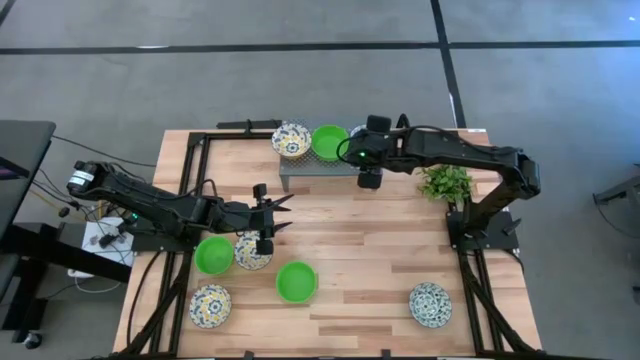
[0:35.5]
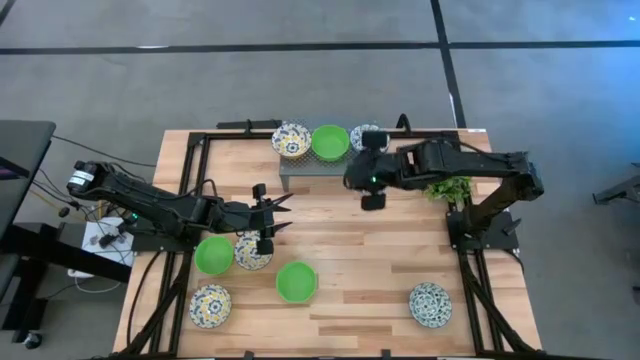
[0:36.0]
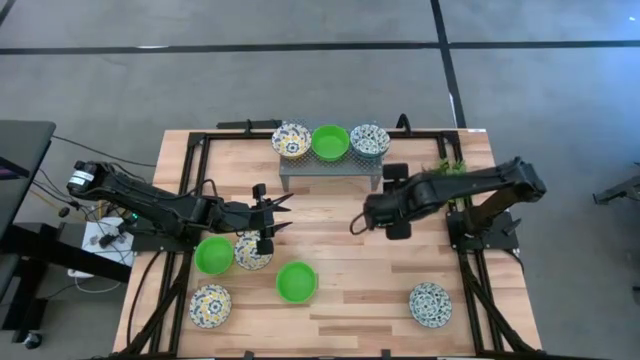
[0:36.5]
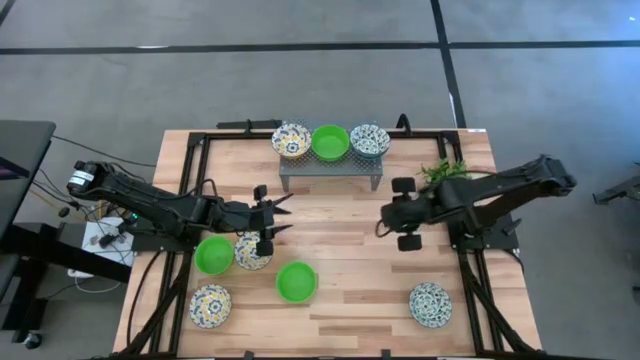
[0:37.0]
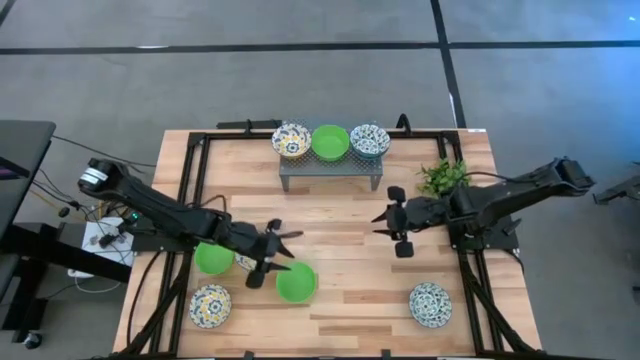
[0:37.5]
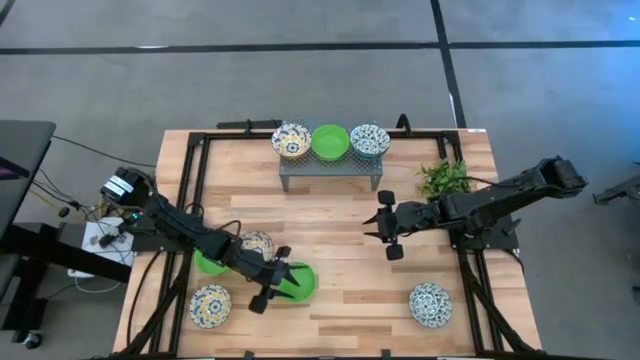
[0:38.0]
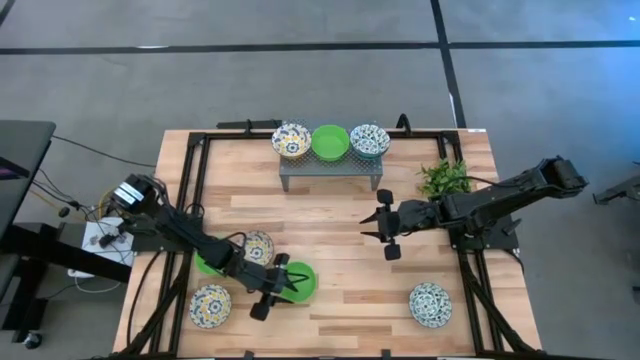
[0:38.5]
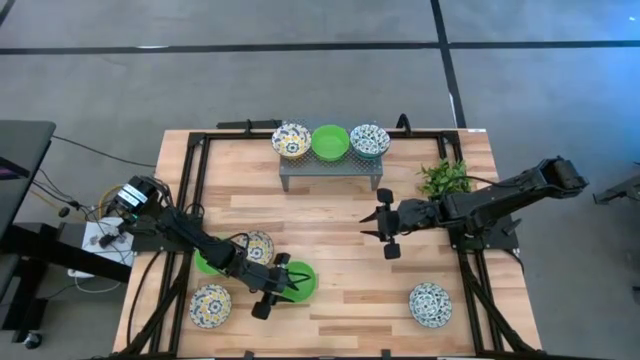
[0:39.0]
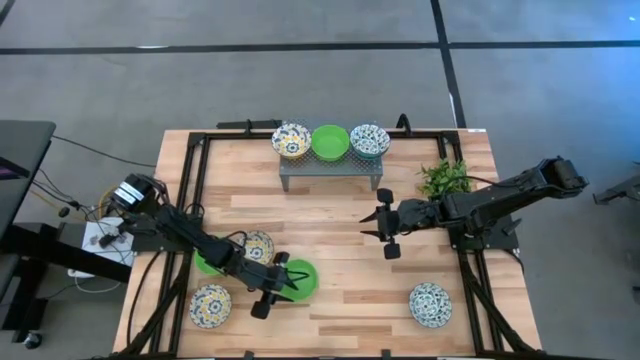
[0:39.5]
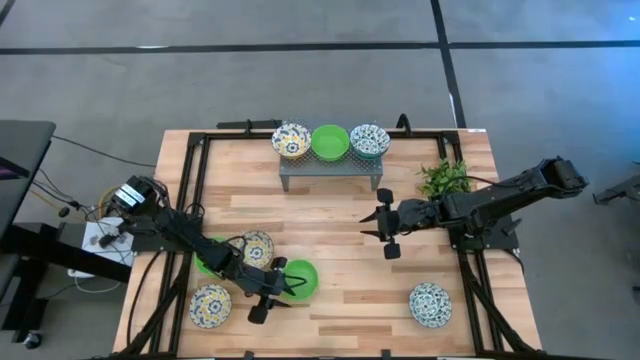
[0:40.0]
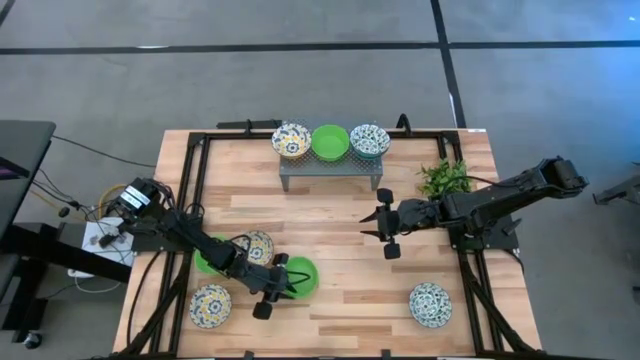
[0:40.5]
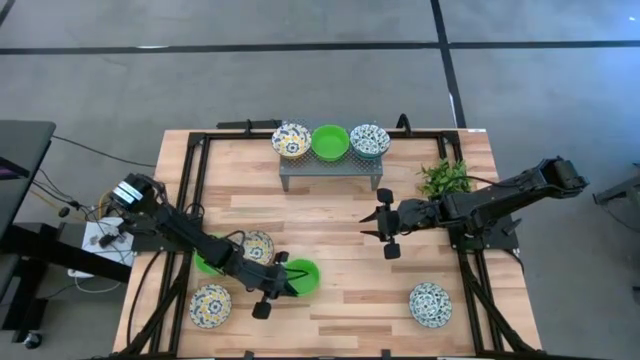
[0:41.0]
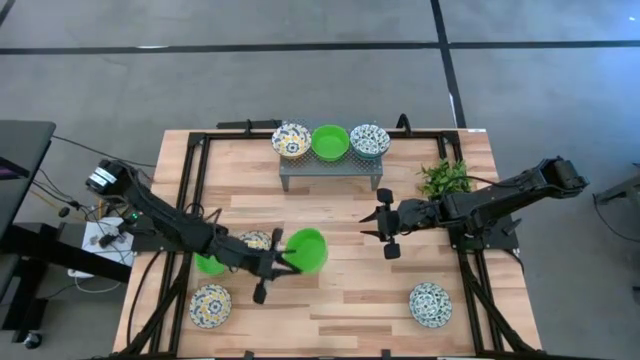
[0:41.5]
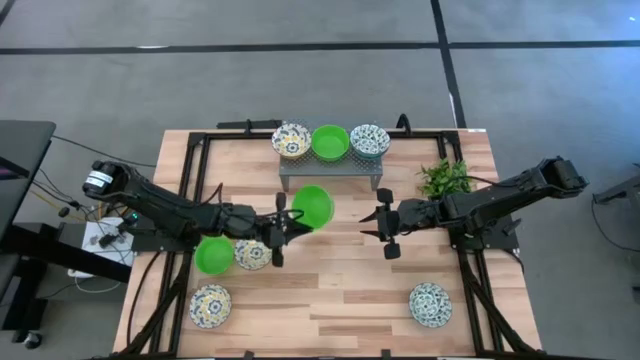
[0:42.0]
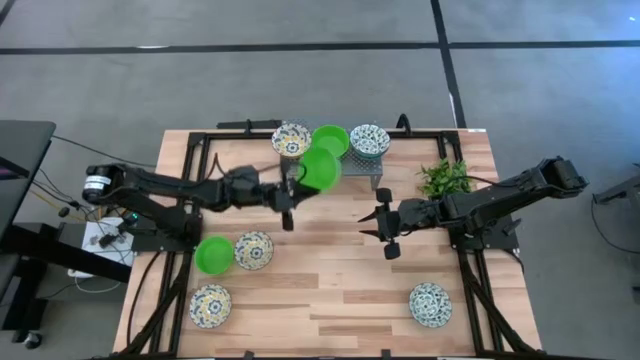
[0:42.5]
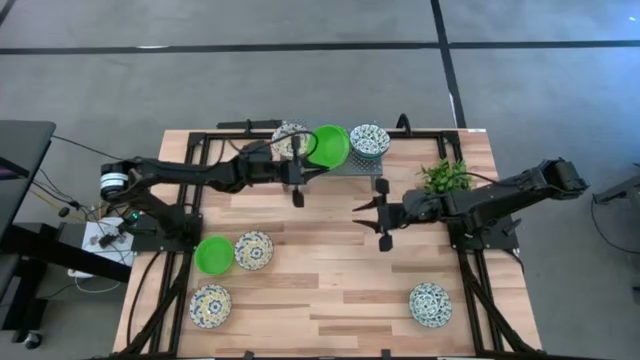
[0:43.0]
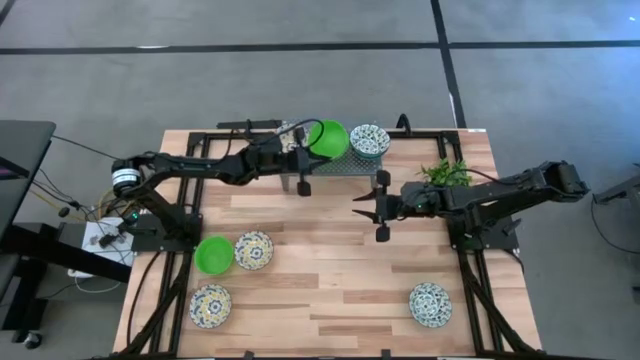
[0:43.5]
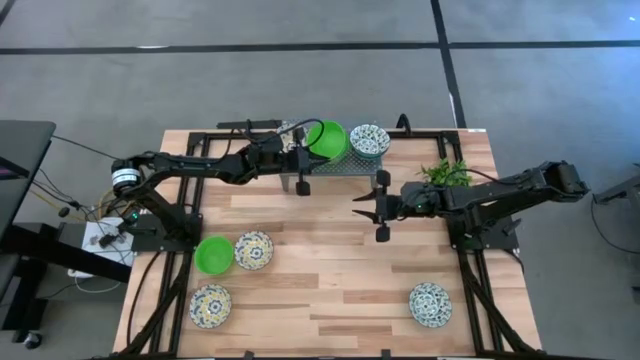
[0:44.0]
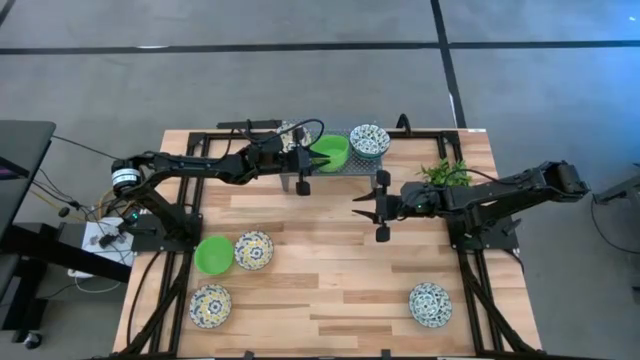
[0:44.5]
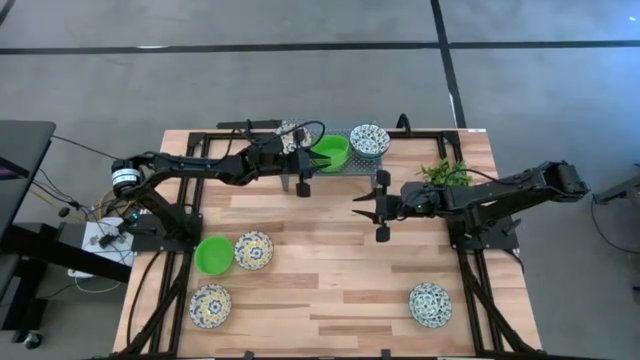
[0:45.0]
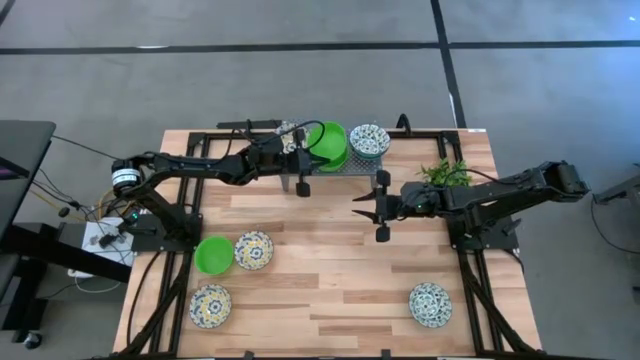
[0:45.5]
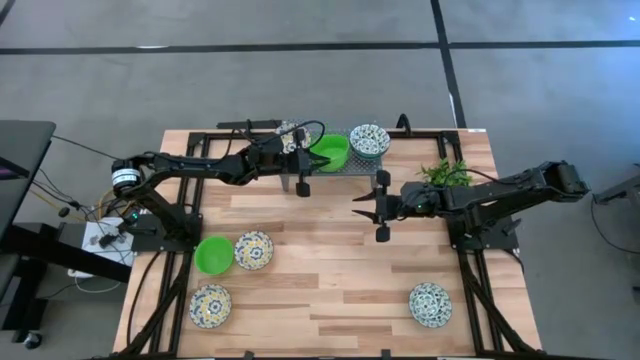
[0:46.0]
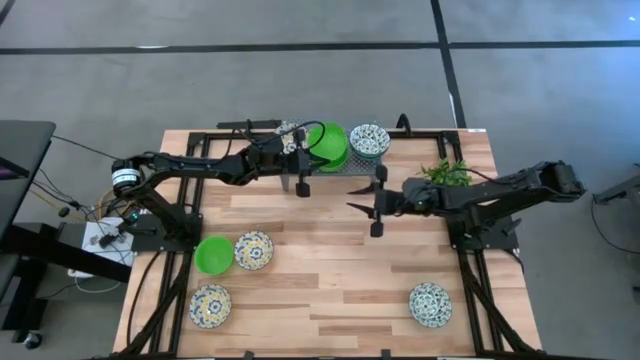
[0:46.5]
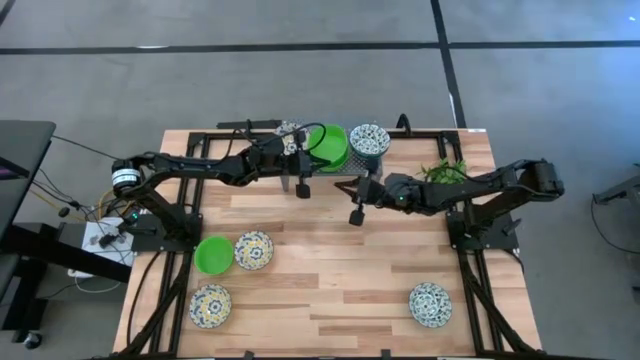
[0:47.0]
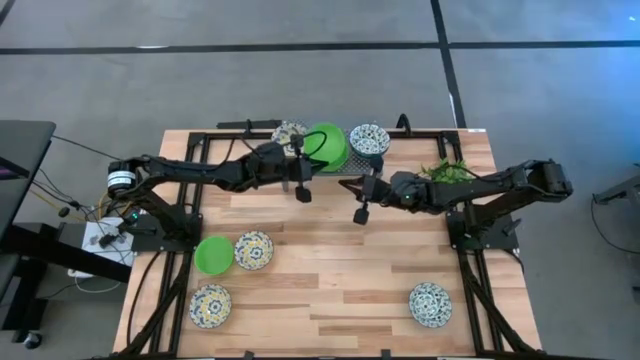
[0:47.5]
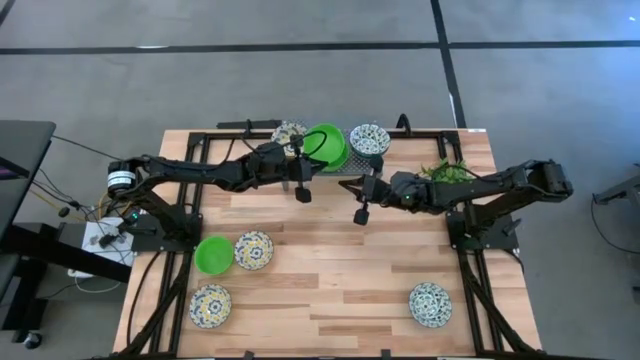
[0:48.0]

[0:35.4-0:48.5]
Task: Pick & Place Mini bowls
Stack the bottom green bowl on top of the green bowl on the shelf

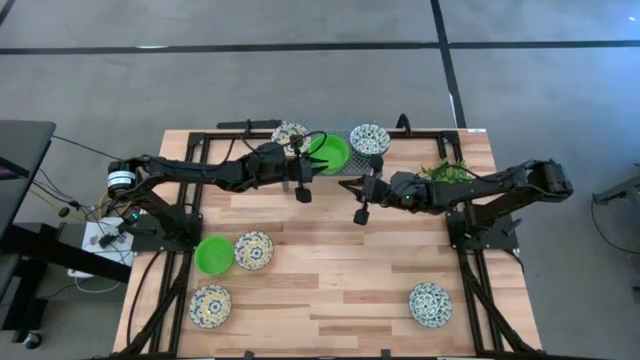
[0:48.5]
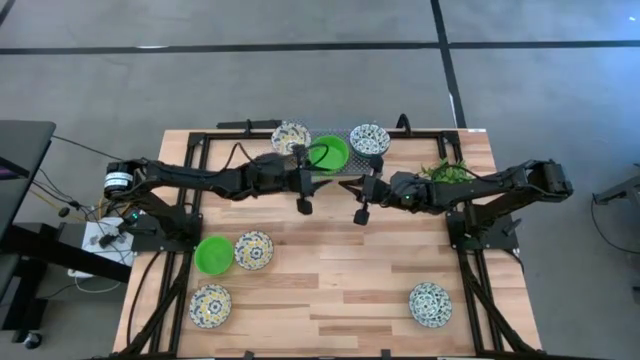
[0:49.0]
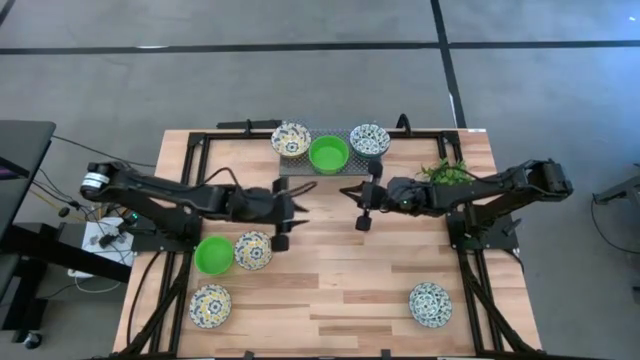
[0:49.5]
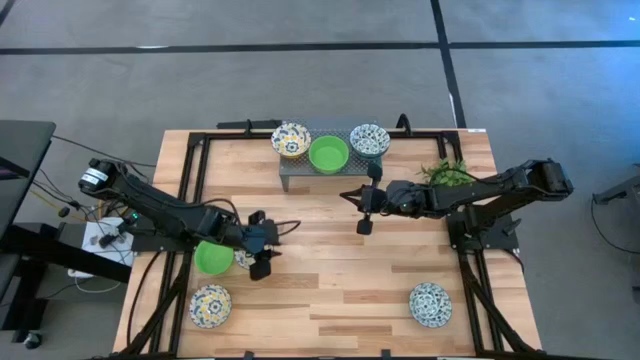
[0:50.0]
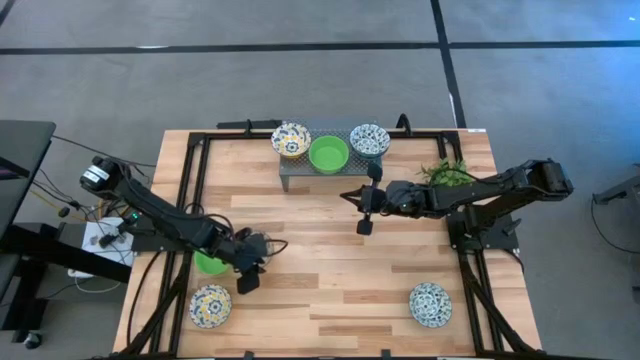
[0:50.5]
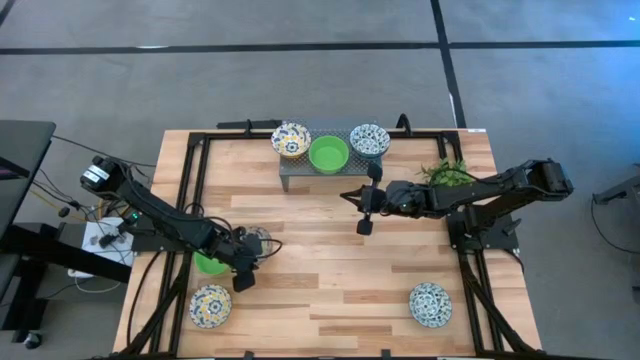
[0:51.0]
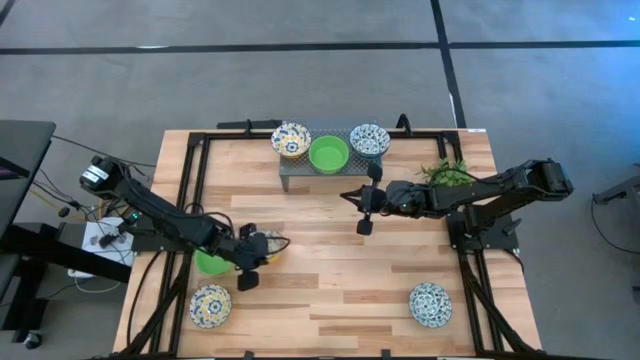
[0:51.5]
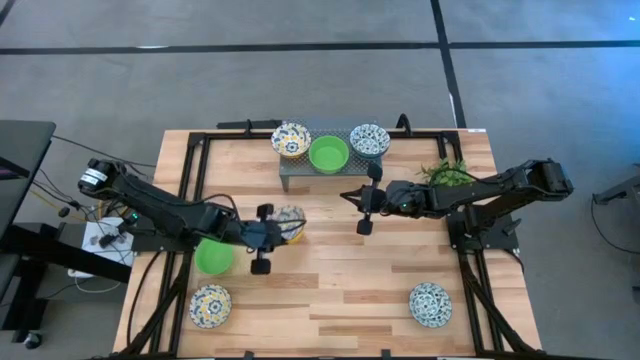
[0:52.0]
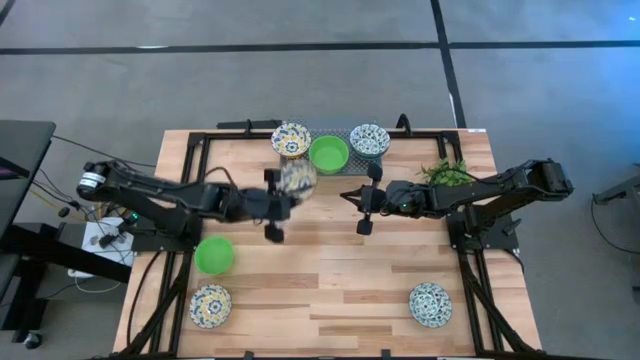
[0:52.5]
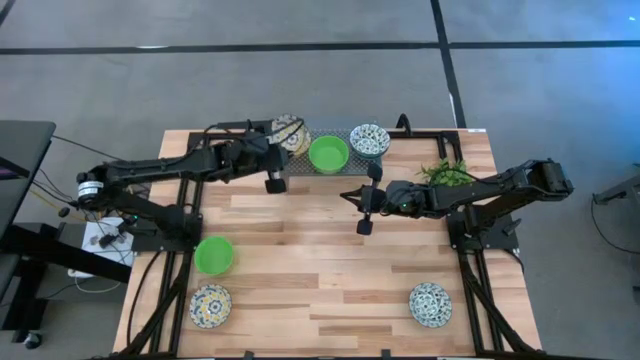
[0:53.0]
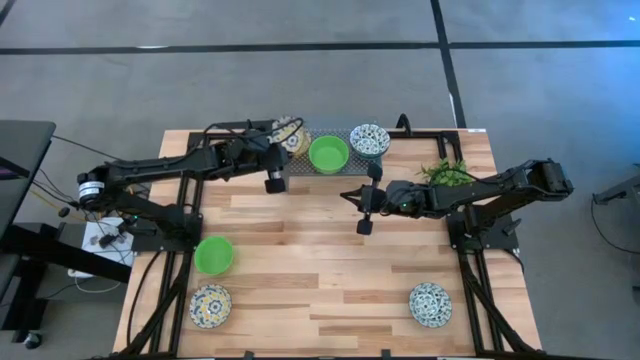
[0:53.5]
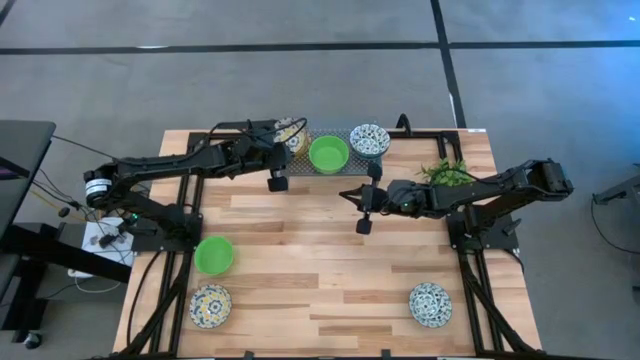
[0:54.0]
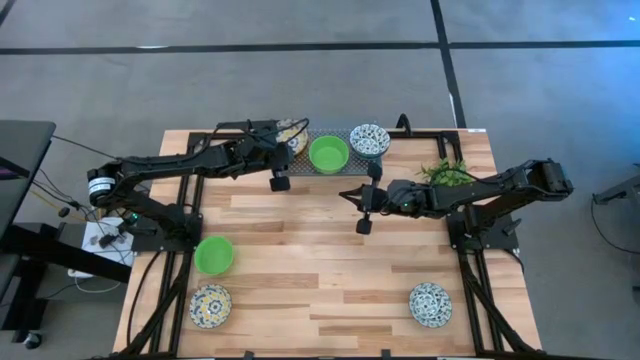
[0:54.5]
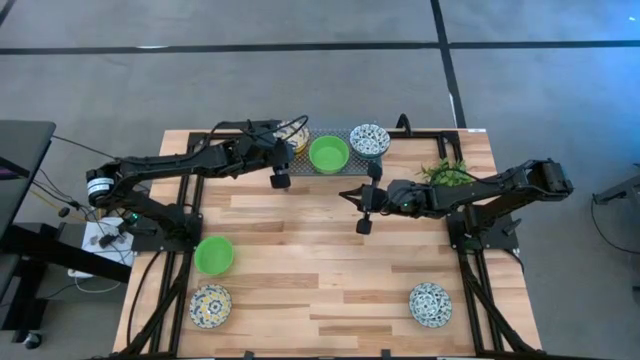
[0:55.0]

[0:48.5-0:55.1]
Stack the top yellow patterned bowl on top of the yellow patterned bowl on the shelf

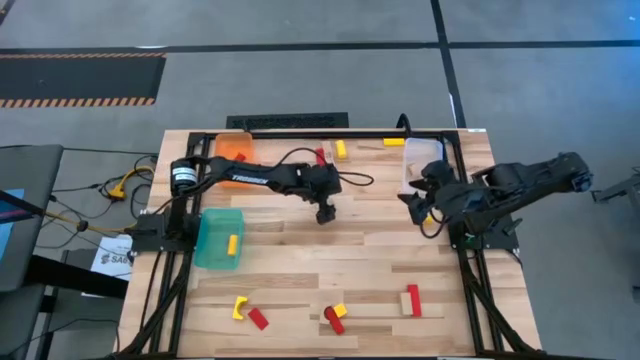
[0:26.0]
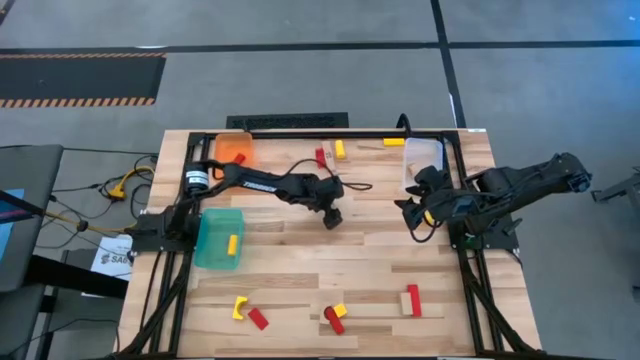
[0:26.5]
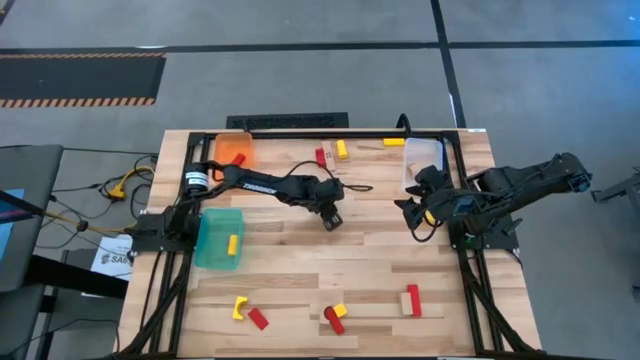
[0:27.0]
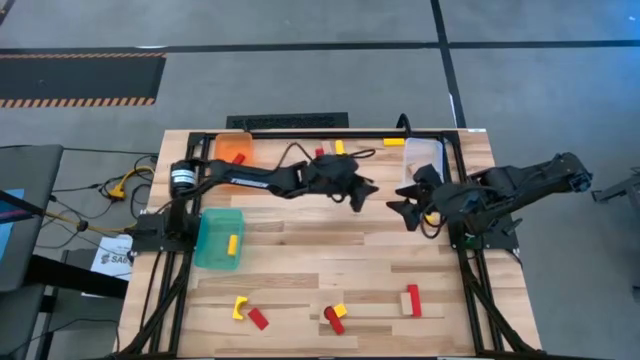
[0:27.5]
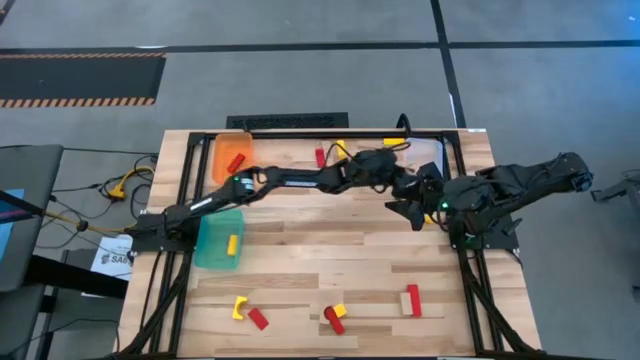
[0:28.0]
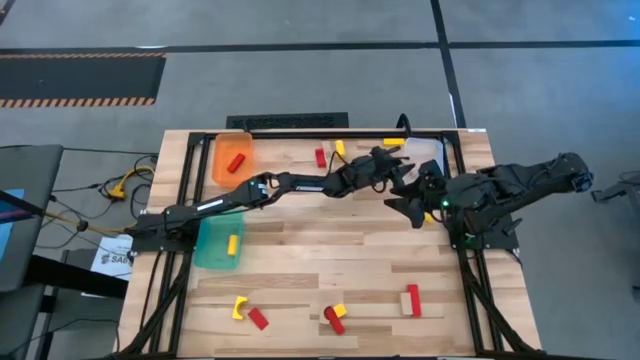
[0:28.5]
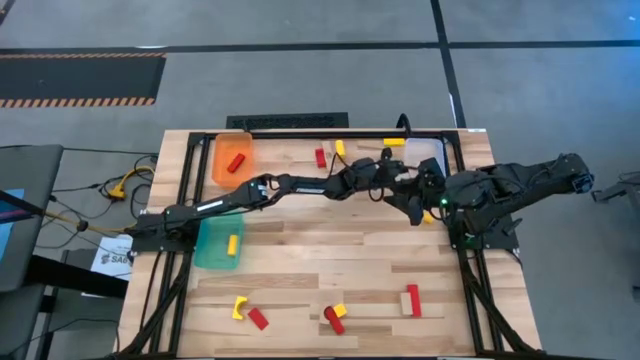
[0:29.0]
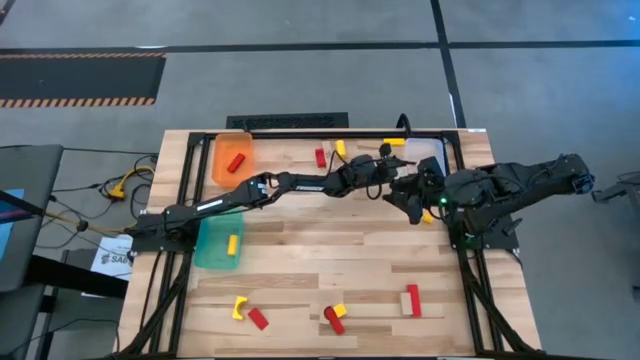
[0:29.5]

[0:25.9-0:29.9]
Task: Sort & place blocks by color
Put the brown wooden block into the white bin
